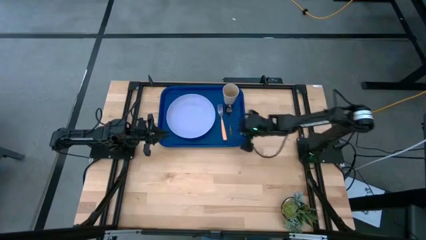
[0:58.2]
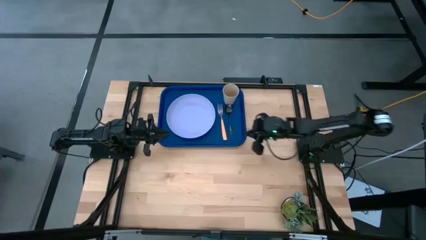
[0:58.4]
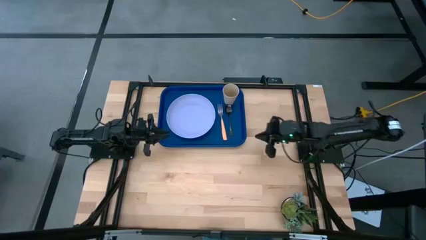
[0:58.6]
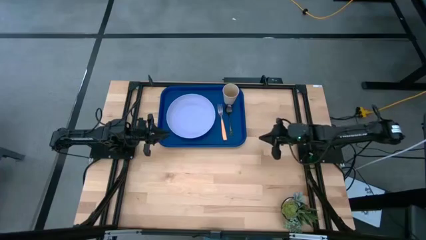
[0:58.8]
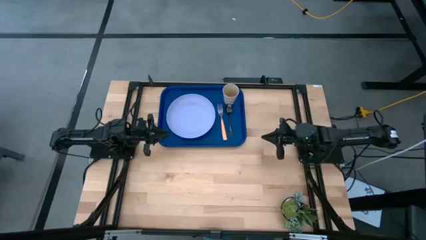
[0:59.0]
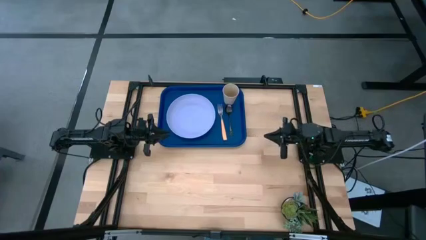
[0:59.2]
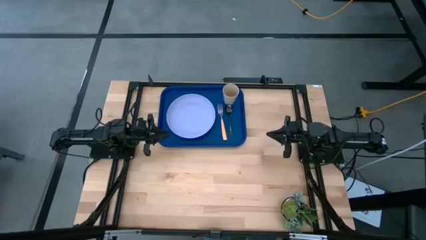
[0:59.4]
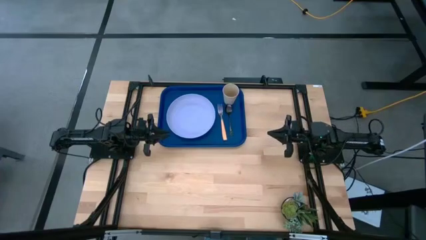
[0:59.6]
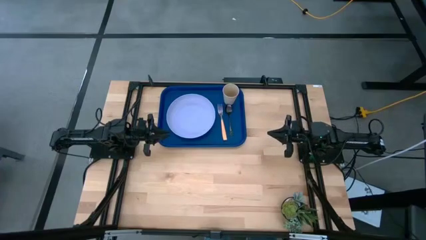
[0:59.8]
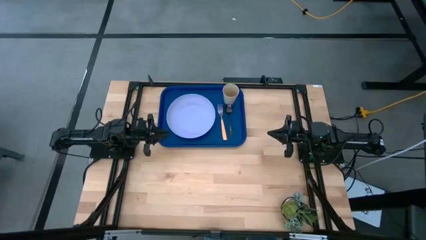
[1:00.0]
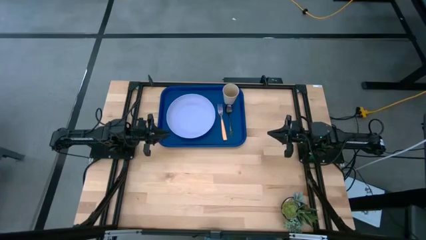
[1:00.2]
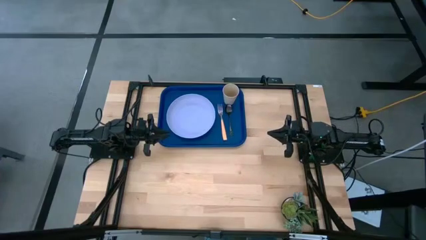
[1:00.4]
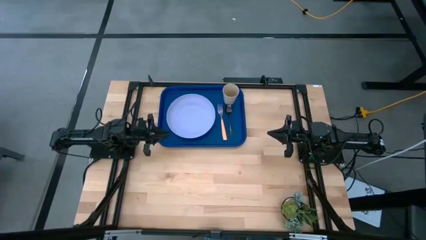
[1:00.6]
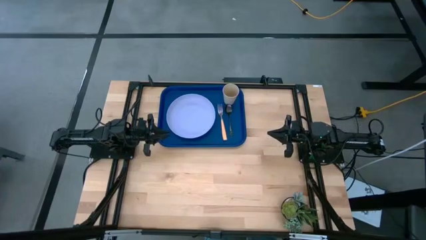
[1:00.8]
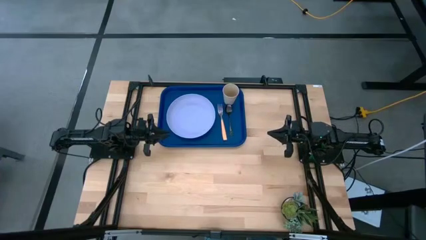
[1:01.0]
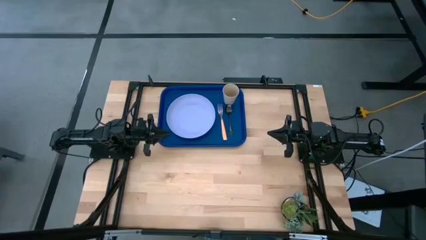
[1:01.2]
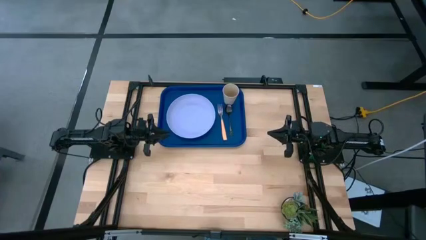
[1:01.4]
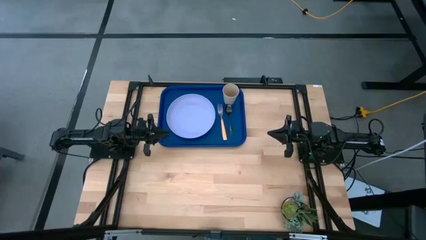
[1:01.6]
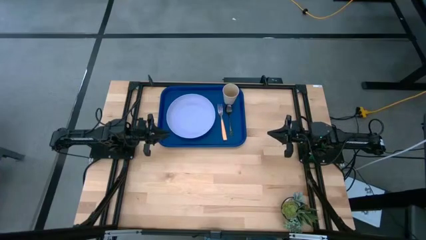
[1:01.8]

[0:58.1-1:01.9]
Task: Pick and place plate/cup/fork/spoon on tray
Return to Home Position

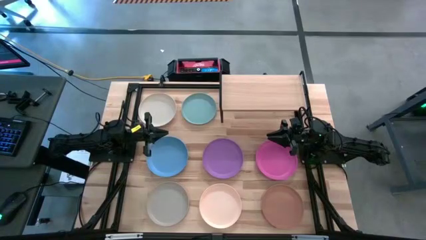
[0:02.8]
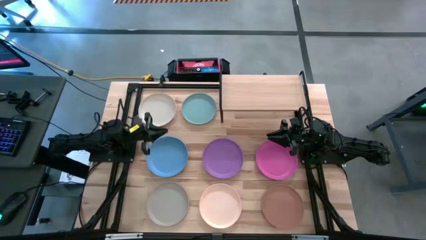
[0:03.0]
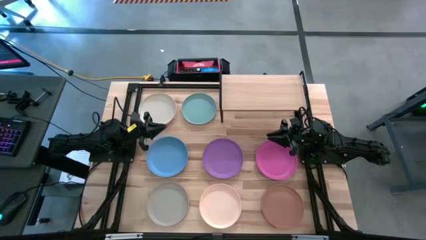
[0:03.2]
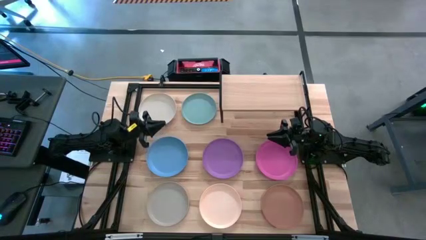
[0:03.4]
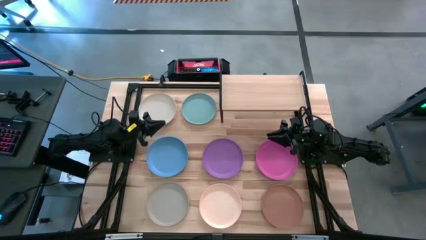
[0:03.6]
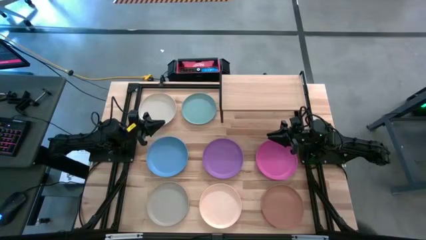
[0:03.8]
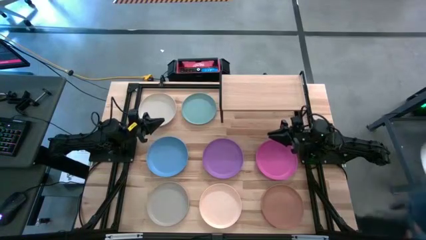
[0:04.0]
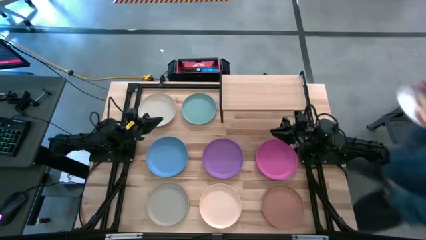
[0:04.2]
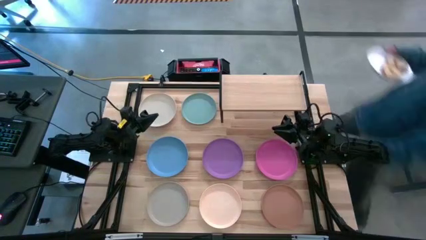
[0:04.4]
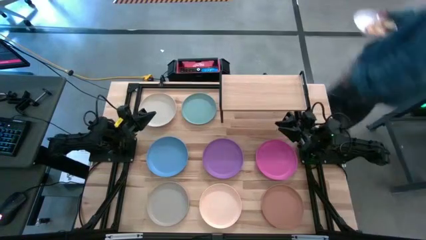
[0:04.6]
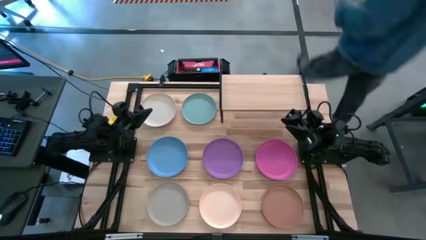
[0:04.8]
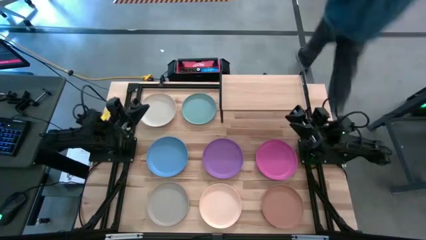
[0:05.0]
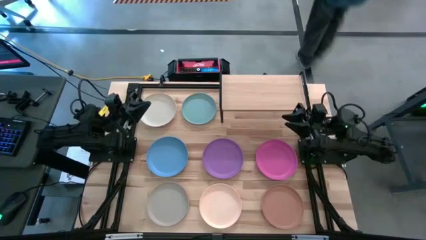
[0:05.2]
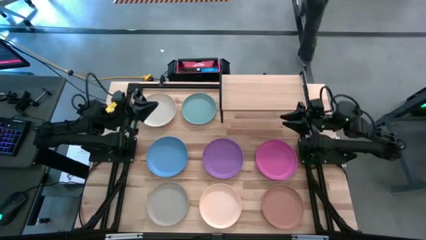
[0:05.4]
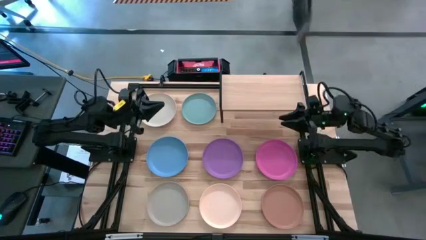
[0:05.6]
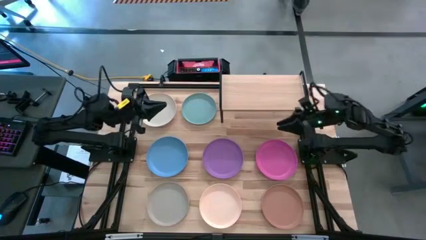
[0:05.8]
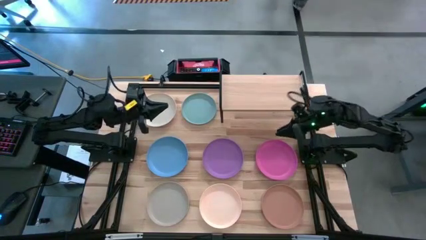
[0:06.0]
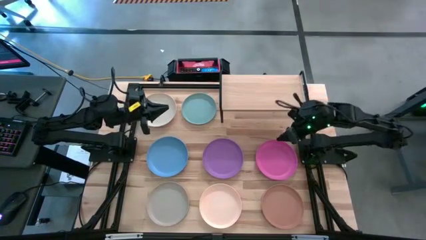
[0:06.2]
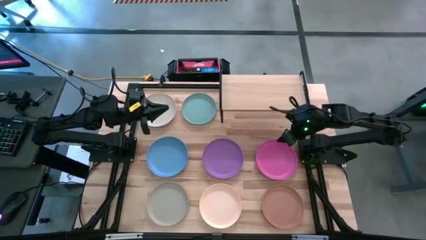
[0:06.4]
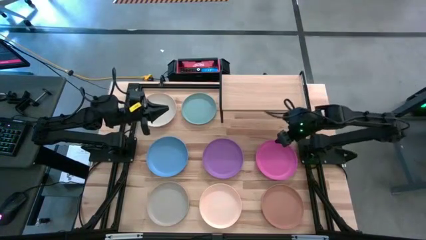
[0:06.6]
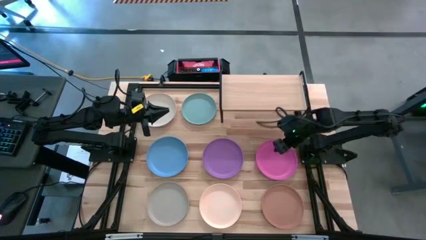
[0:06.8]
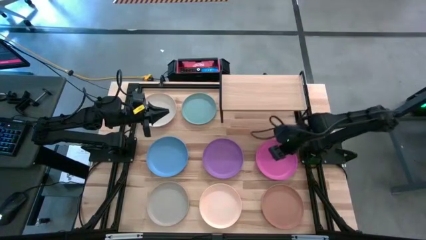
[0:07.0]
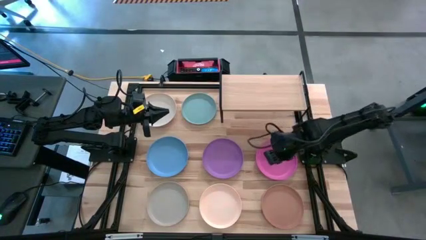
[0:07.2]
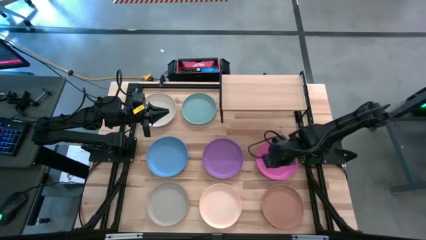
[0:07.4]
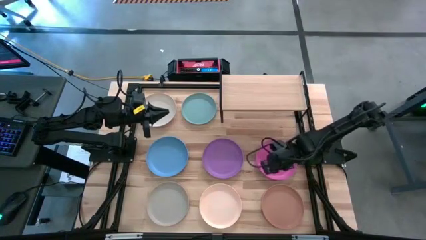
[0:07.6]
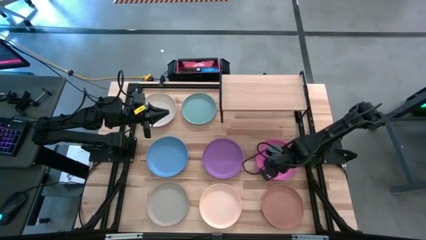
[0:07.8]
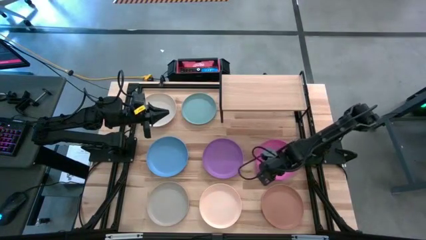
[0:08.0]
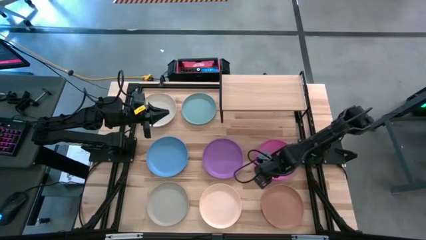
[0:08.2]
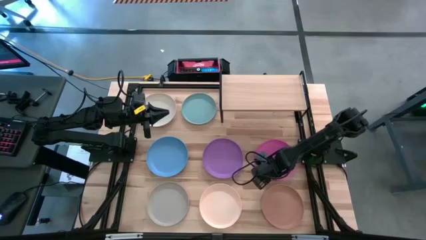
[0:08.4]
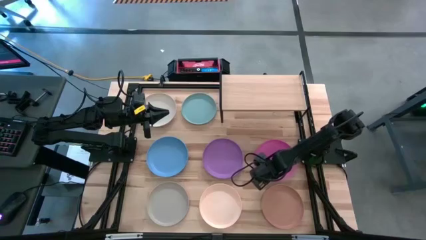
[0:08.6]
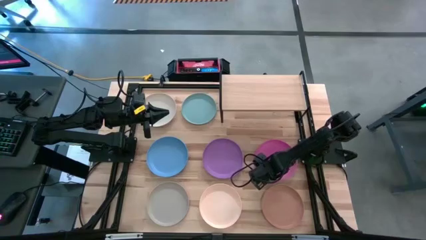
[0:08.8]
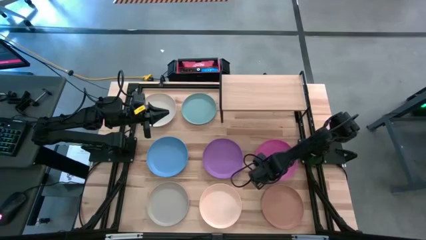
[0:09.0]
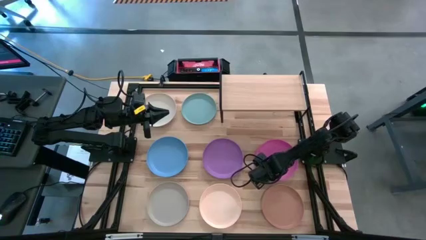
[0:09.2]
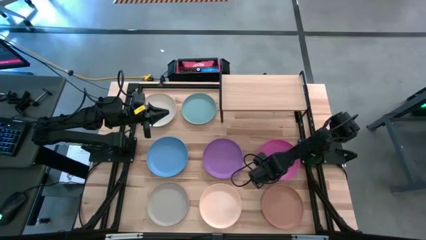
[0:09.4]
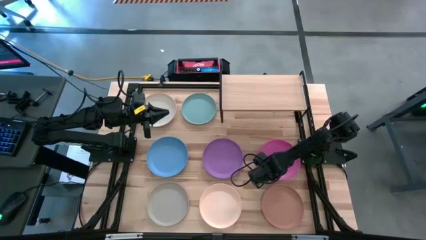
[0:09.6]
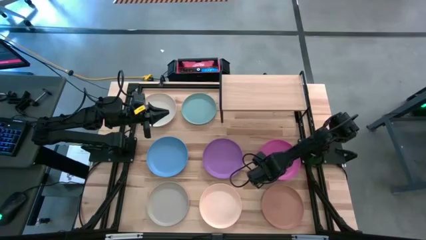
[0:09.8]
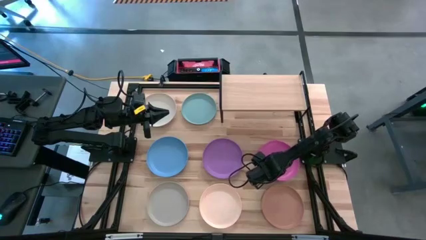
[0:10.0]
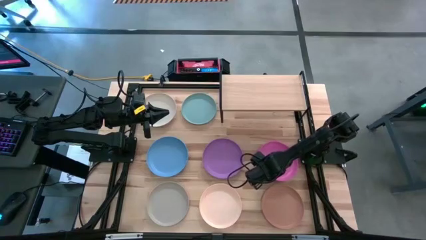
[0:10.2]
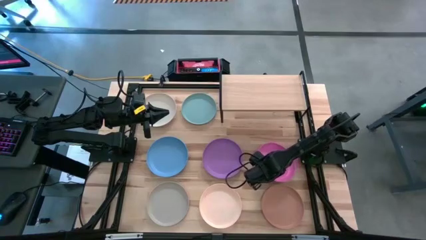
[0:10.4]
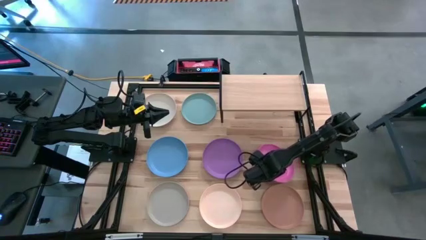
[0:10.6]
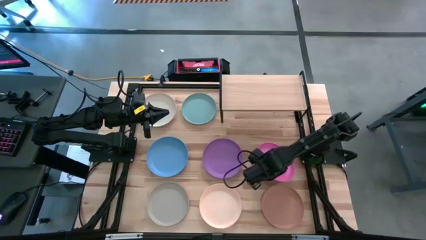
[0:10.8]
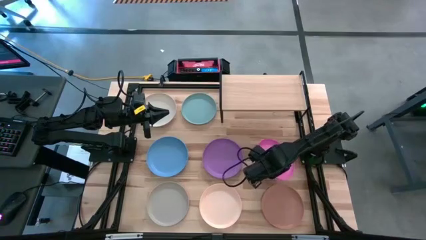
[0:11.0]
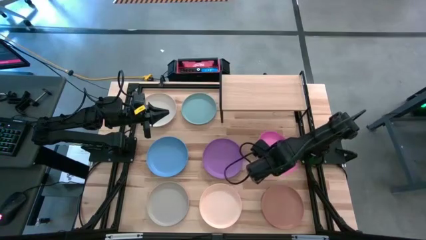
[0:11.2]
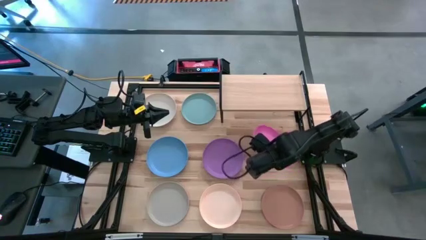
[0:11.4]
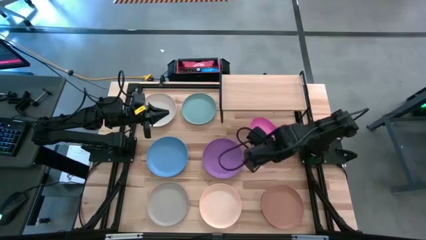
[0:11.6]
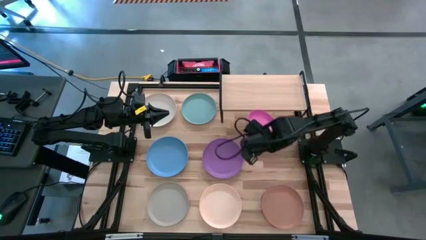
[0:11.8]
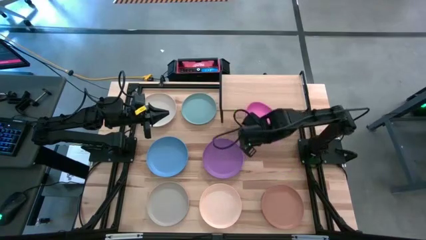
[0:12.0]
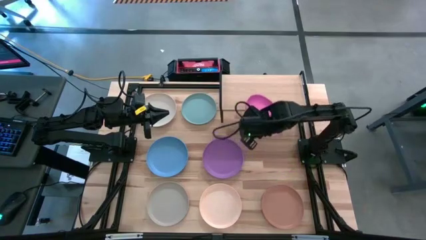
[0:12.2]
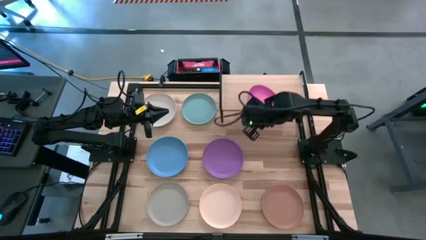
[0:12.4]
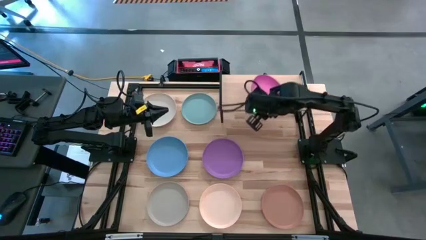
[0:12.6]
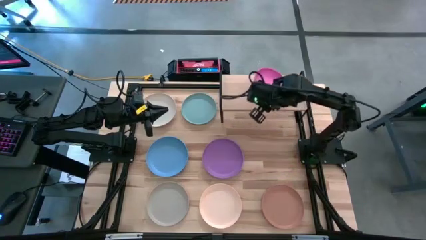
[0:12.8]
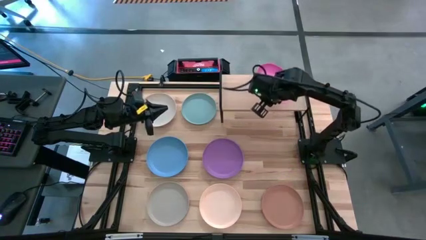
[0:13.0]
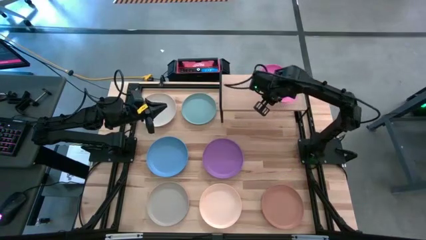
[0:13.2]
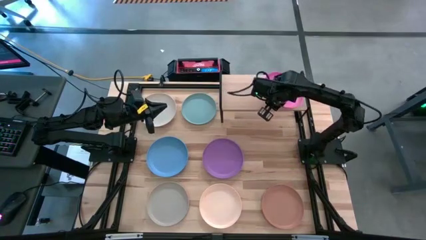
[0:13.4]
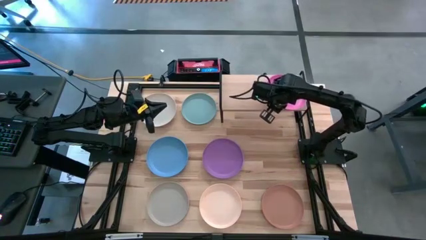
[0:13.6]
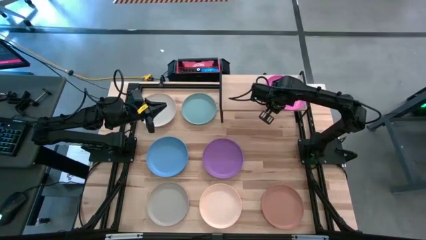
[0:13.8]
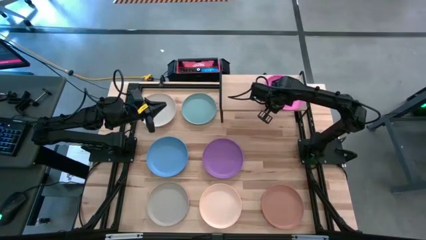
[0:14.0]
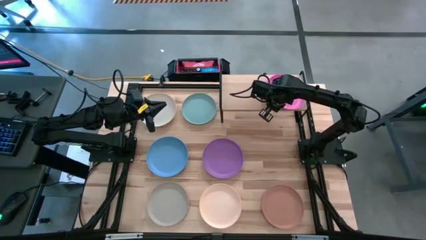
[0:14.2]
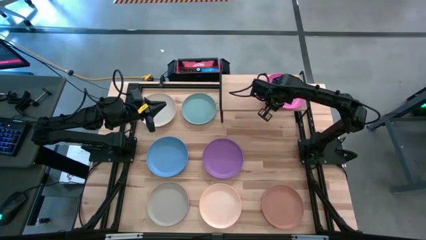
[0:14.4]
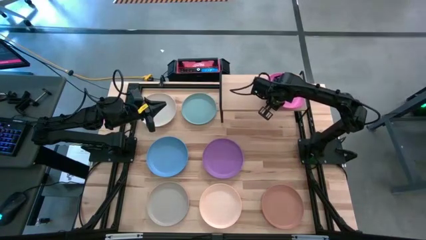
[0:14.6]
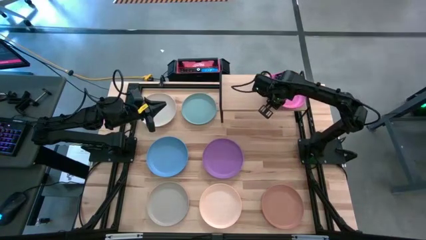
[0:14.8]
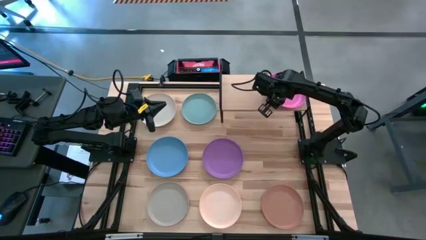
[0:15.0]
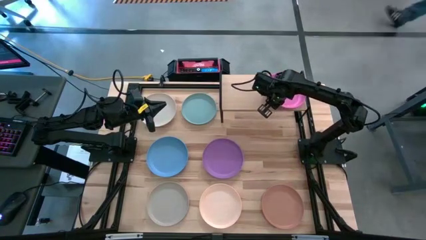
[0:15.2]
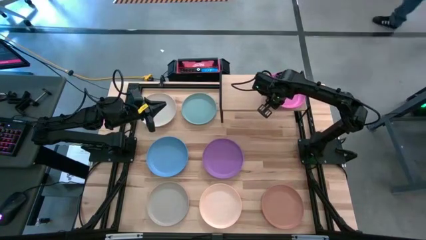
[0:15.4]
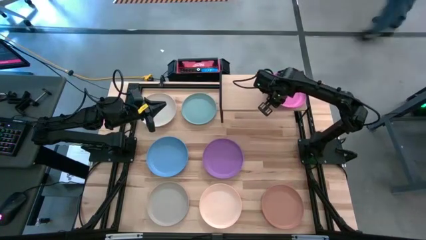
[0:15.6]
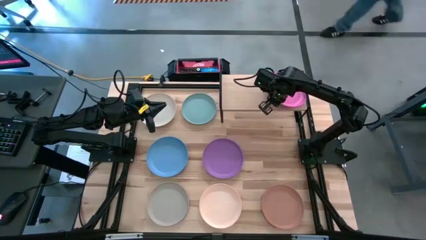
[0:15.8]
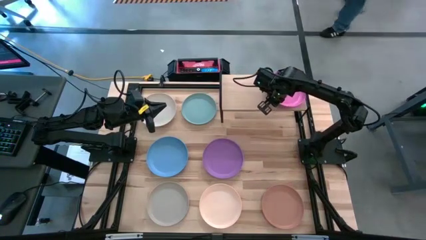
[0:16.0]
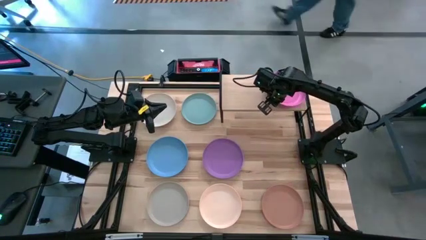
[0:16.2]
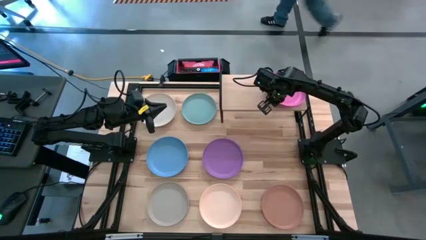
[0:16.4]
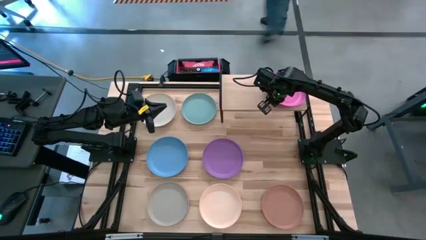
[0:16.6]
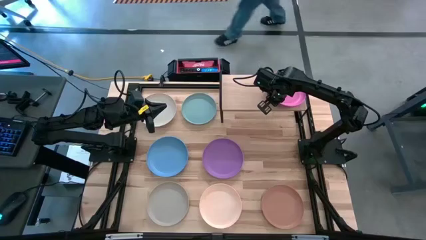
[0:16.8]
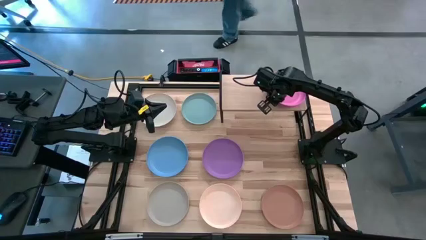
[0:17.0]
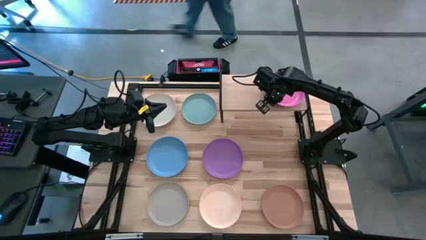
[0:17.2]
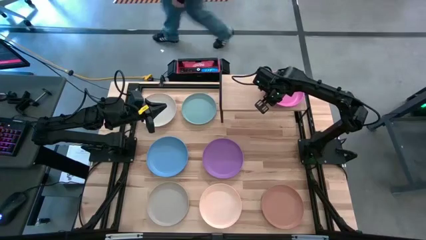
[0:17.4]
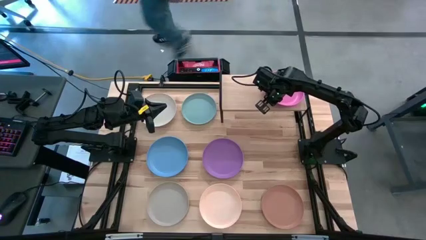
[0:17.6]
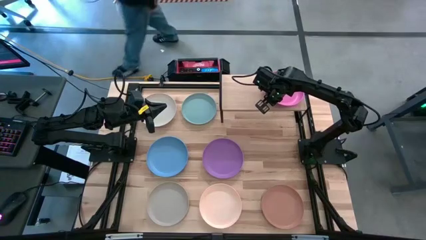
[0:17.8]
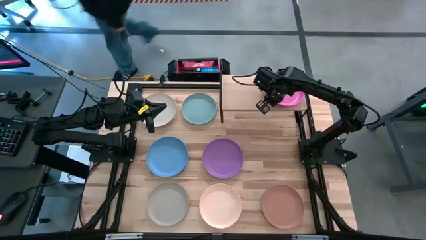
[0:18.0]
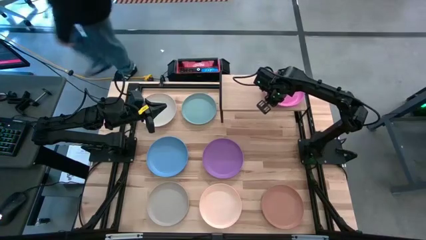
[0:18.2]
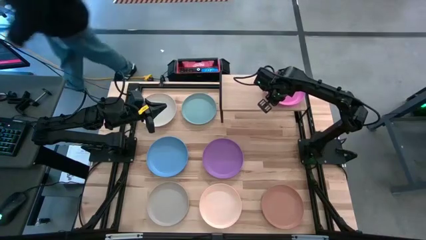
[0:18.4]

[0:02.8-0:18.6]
Task: Place and stack plates onto a shelf
Put the pink plate on the shelf
